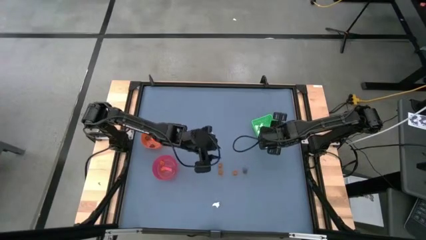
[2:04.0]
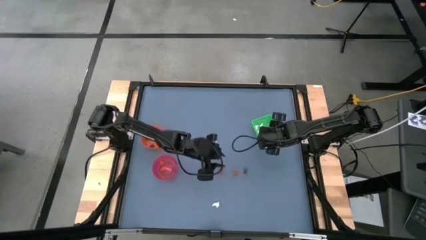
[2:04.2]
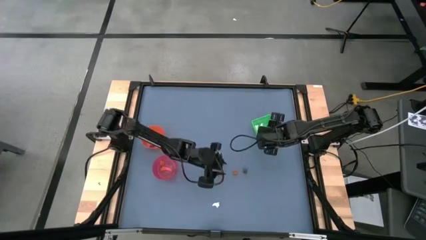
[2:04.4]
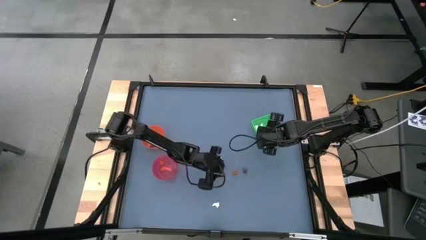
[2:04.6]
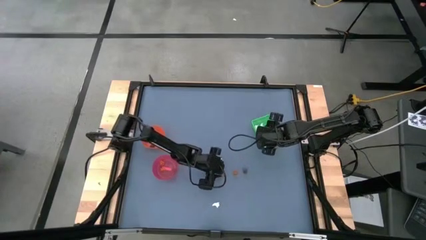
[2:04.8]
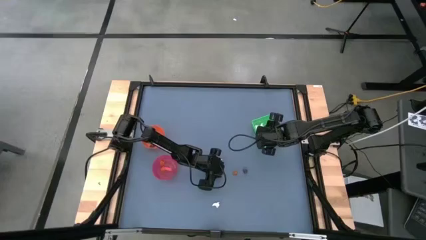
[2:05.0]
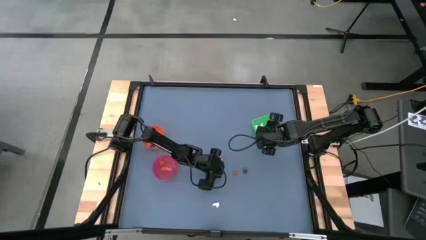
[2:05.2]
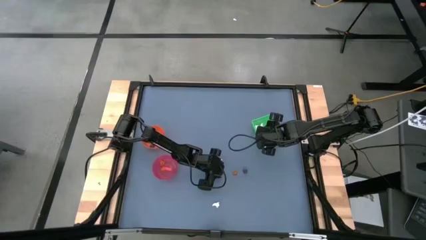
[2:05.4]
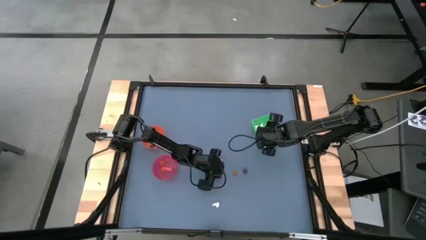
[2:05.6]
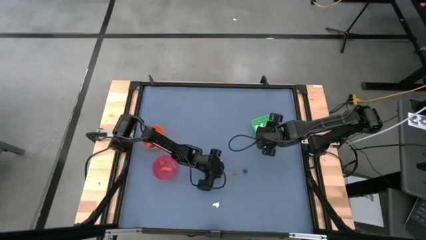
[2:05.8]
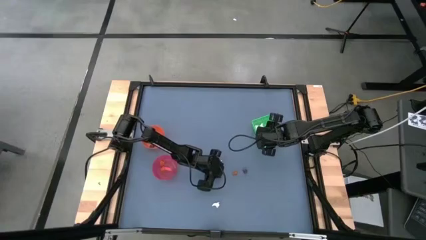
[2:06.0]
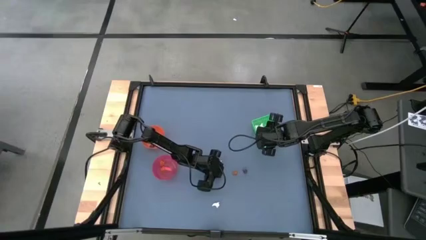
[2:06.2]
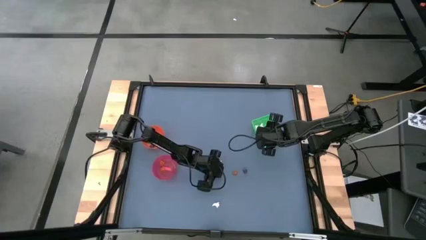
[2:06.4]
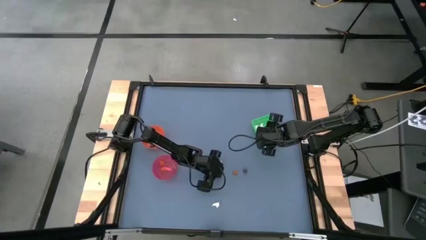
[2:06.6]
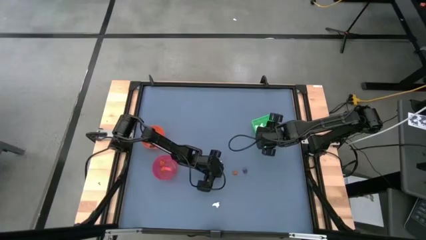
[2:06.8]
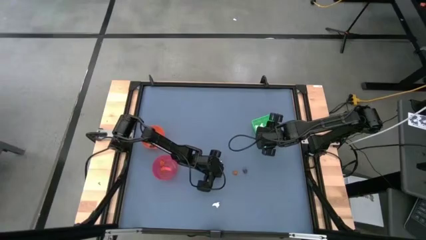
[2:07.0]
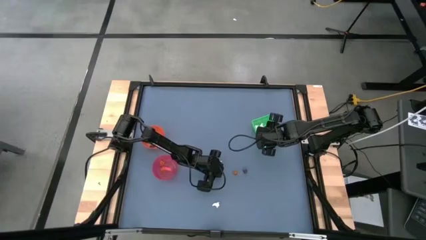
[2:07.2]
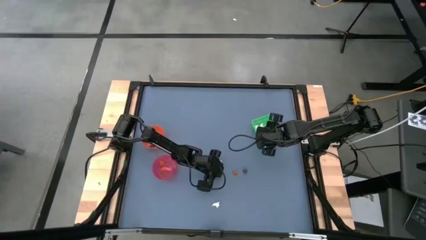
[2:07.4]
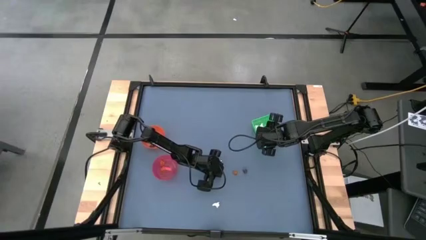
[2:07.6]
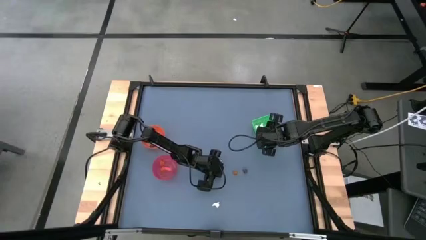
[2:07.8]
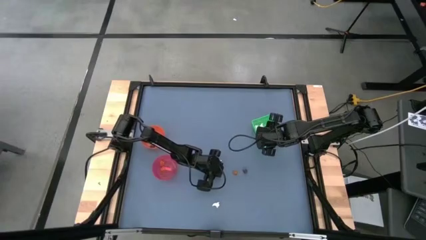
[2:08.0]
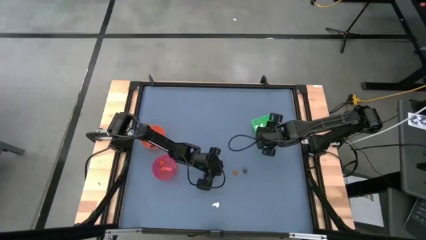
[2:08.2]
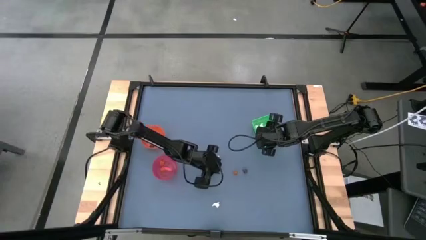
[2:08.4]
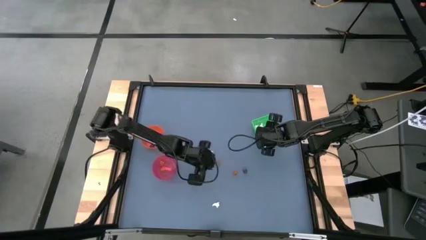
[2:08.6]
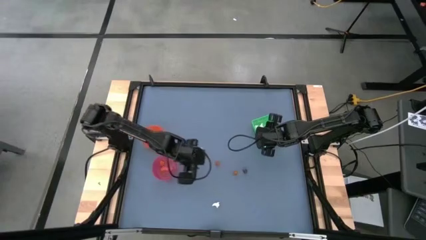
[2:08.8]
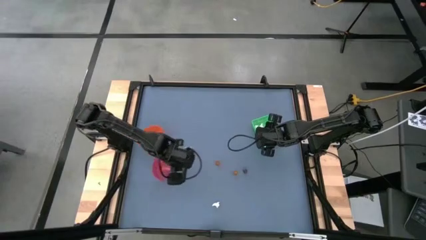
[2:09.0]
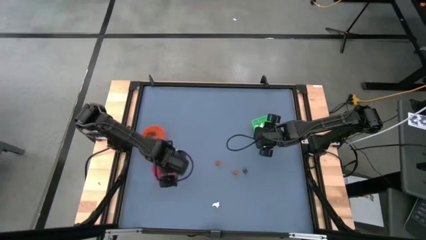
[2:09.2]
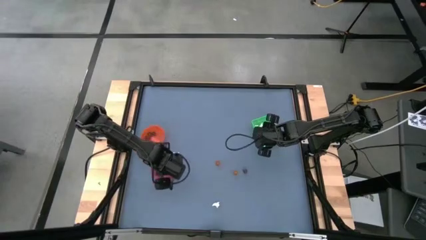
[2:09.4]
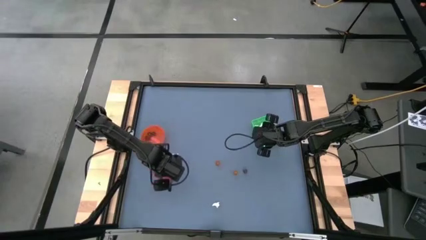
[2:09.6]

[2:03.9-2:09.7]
Task: Sort Halloween decoration
Put the orange pumpkin toy into the red bowl

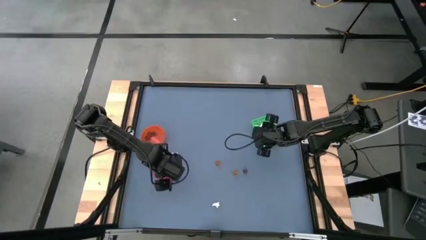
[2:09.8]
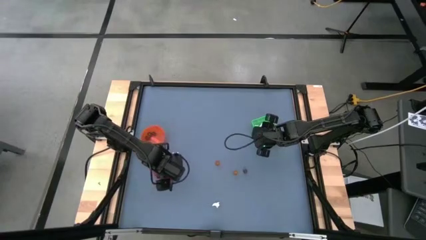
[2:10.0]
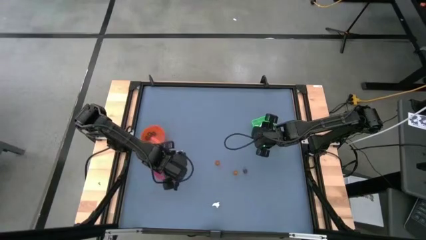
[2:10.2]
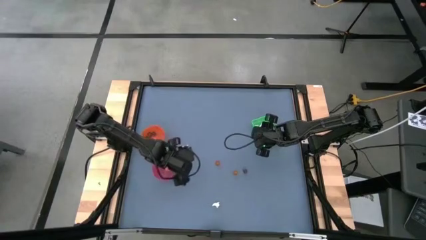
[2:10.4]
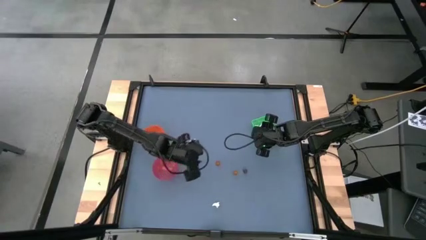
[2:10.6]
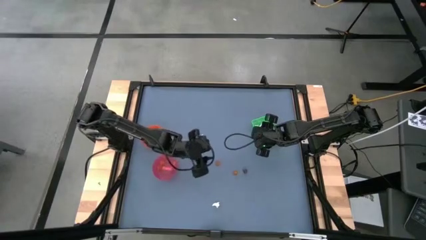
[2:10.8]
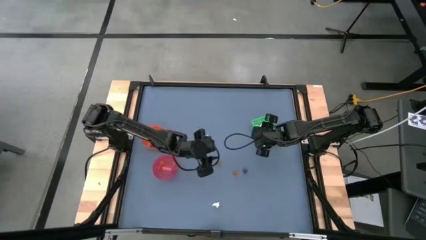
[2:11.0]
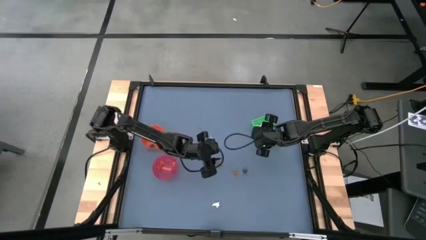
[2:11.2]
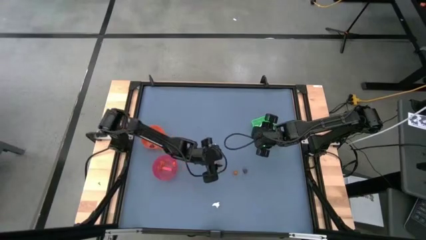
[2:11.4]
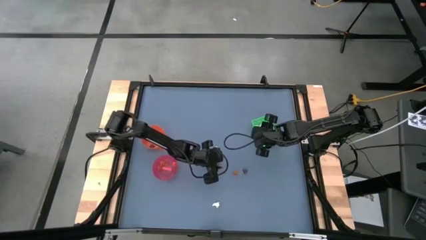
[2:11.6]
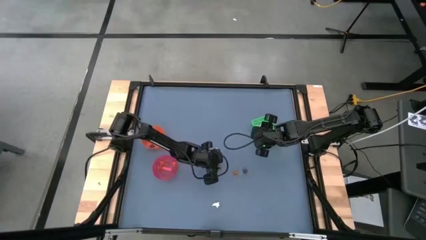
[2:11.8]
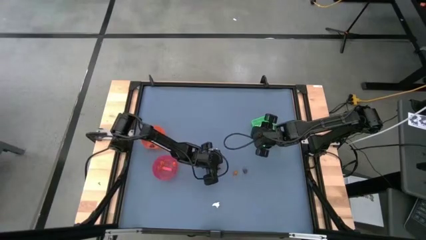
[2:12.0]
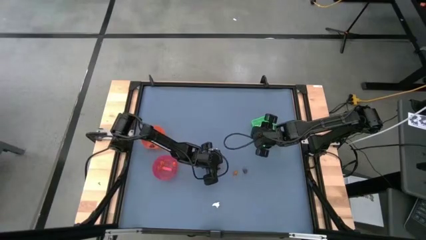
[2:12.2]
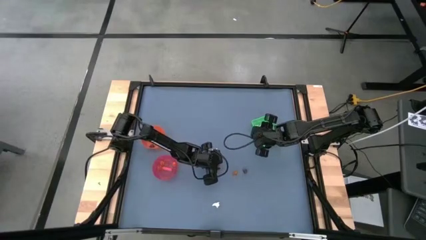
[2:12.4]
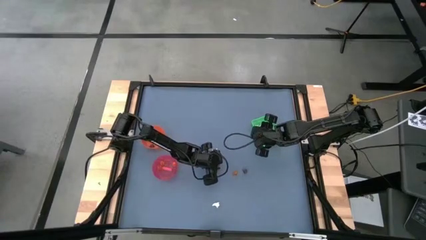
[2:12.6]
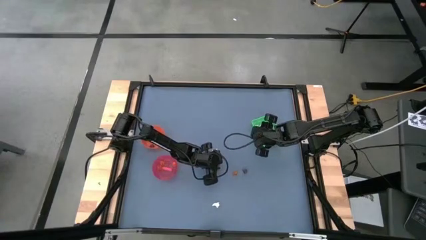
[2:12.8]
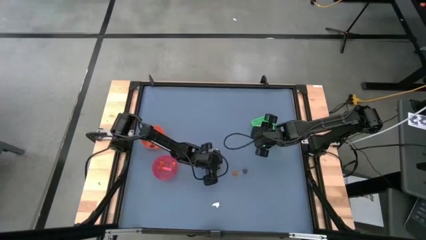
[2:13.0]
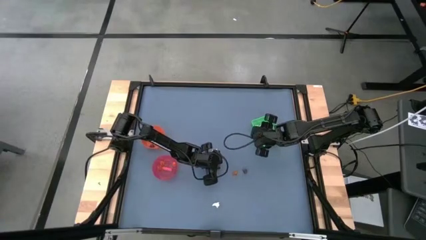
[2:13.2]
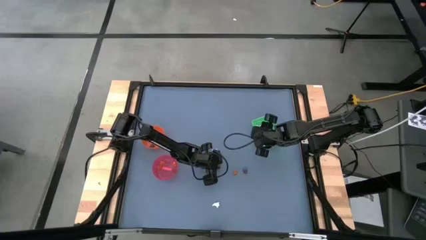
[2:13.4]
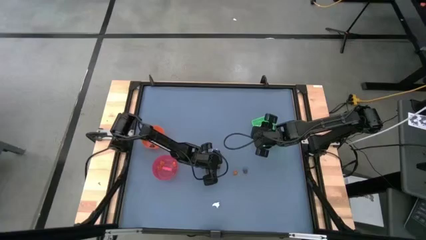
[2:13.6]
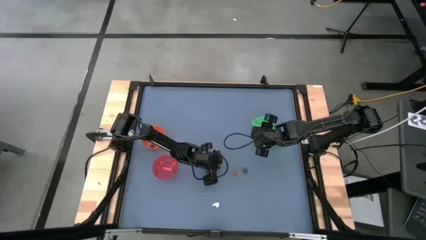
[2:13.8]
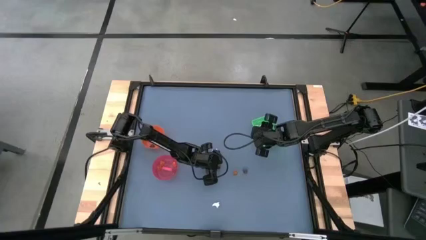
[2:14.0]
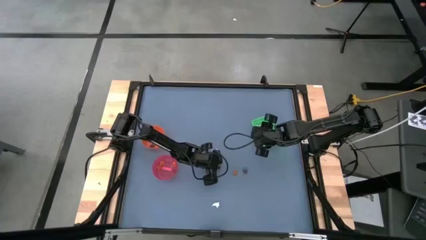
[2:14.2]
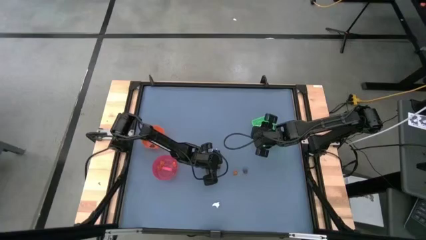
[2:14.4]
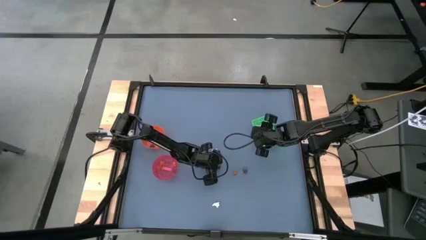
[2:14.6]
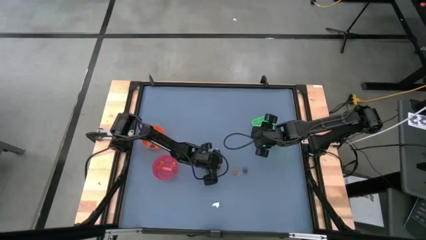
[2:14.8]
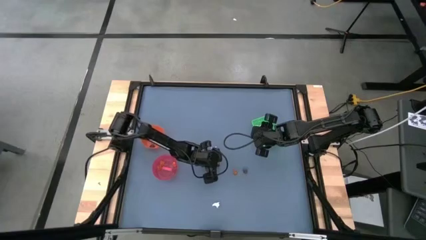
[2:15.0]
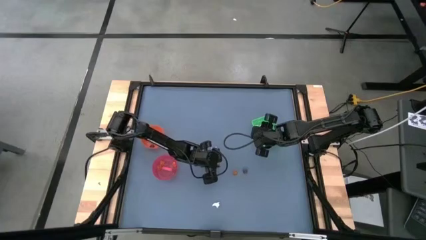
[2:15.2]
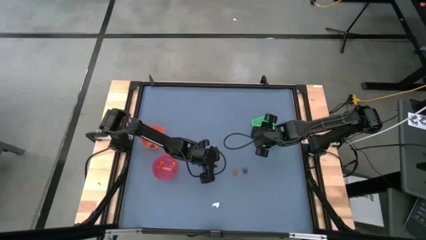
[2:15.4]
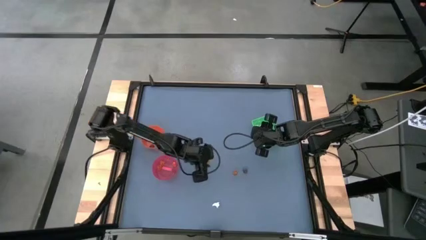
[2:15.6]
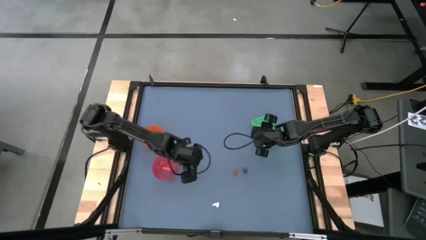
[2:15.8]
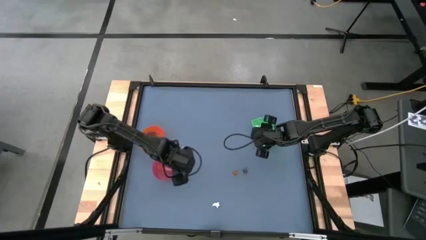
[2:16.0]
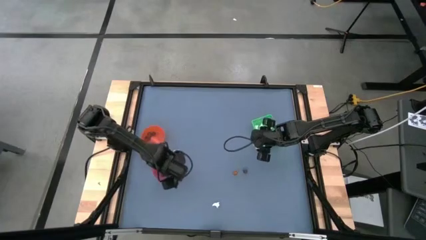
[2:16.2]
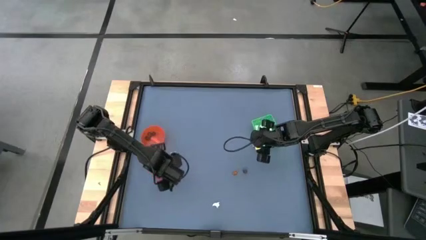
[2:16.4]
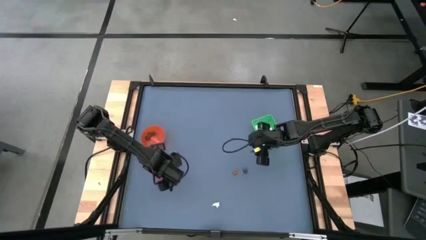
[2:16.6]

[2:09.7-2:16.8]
Put the orange pumpkin toy into the red bowl

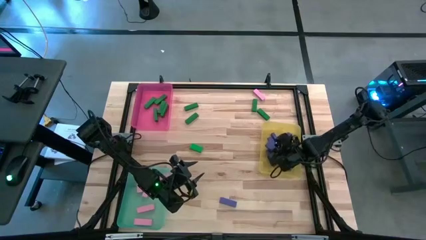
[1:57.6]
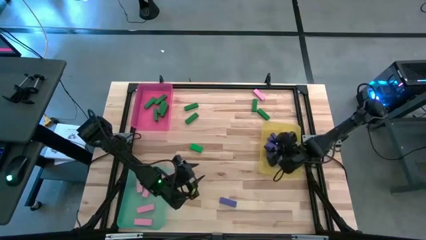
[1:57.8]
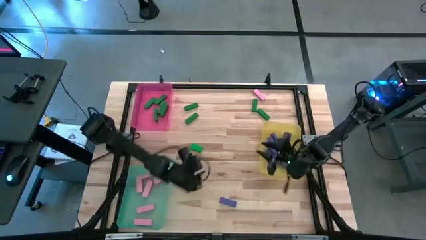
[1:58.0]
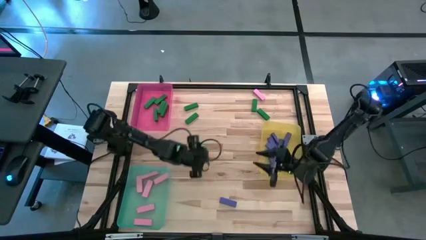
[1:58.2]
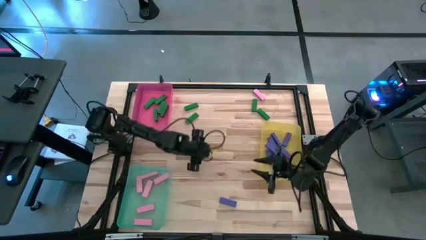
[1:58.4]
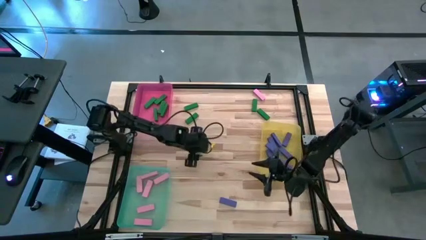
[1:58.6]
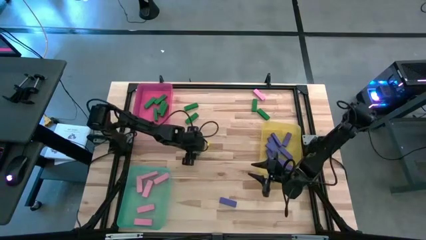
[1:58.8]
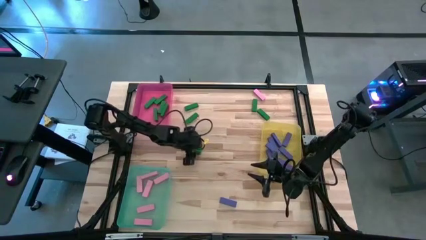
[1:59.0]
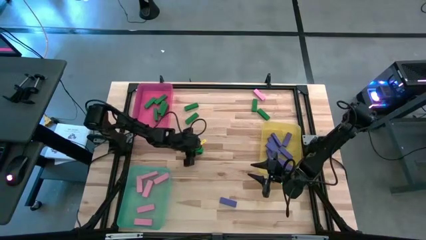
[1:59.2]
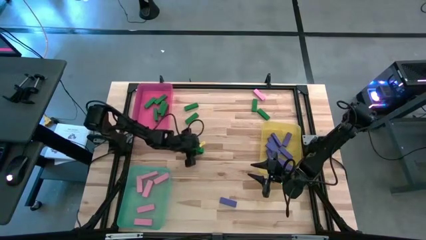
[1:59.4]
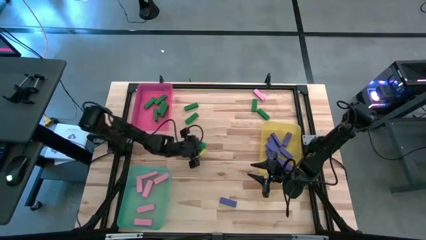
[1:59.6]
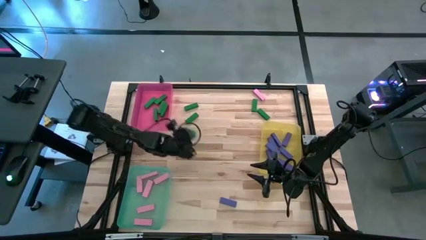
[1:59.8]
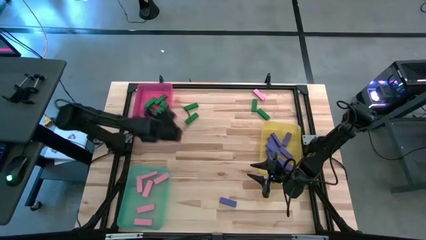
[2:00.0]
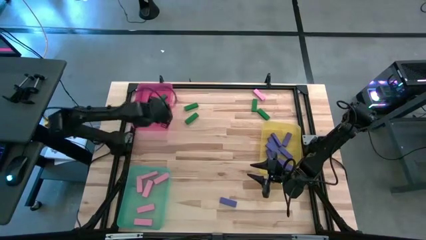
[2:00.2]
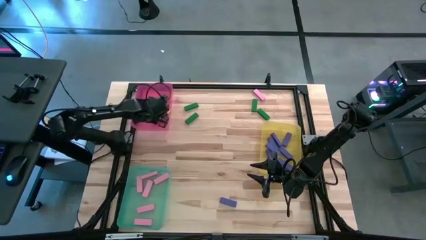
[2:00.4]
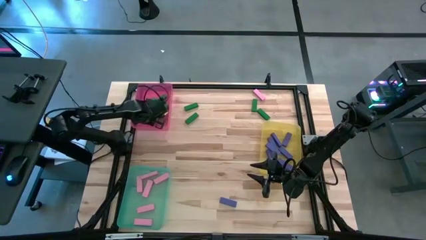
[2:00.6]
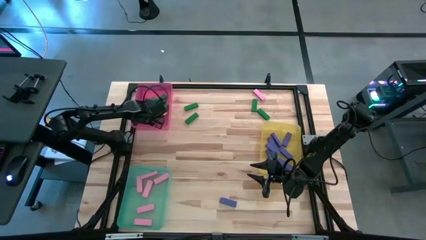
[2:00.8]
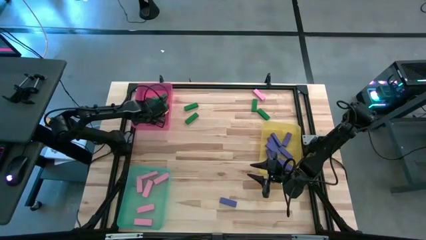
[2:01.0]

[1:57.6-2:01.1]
Task: Sort blocks
Put the green block into the pink bin
